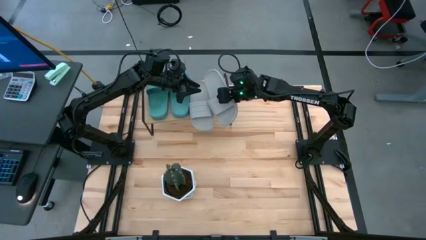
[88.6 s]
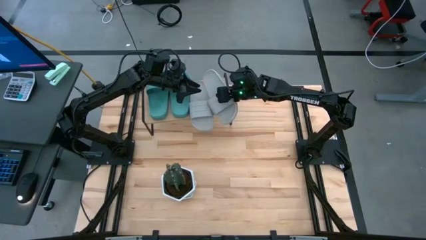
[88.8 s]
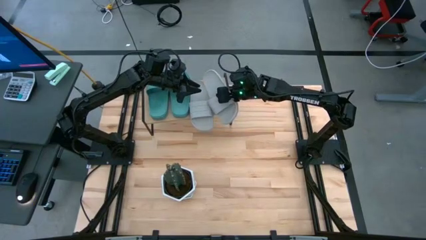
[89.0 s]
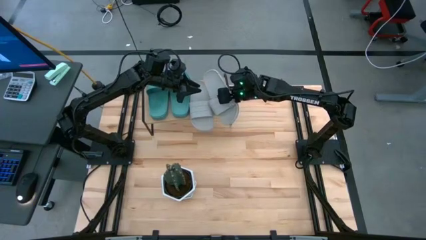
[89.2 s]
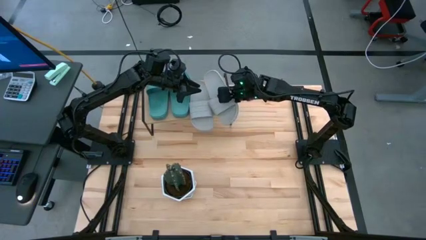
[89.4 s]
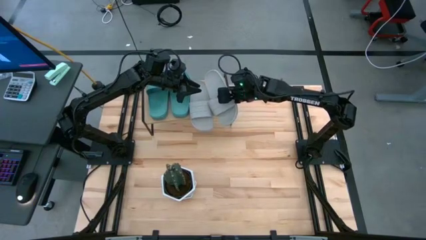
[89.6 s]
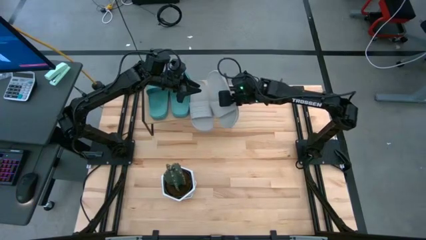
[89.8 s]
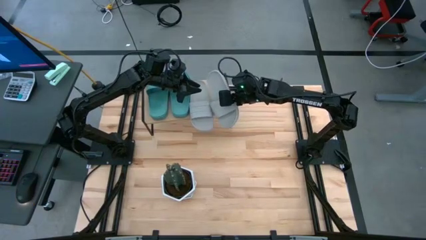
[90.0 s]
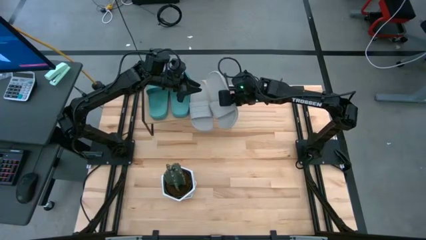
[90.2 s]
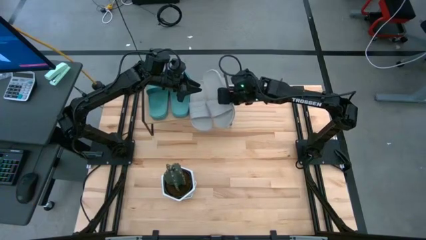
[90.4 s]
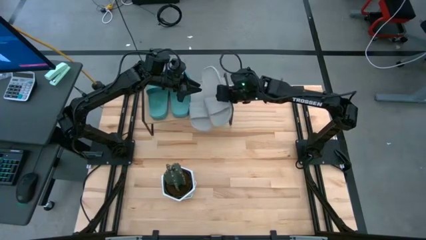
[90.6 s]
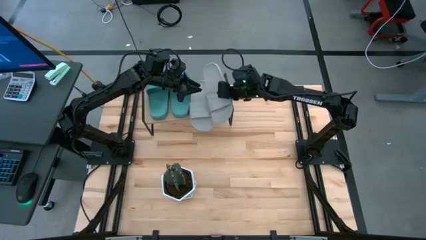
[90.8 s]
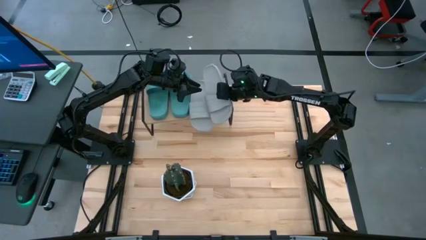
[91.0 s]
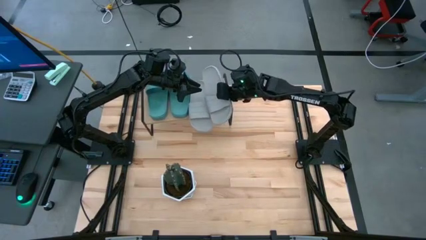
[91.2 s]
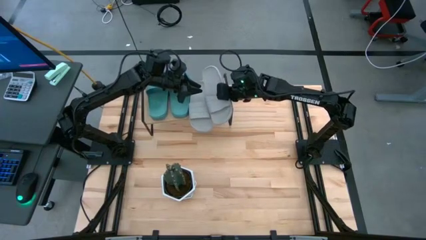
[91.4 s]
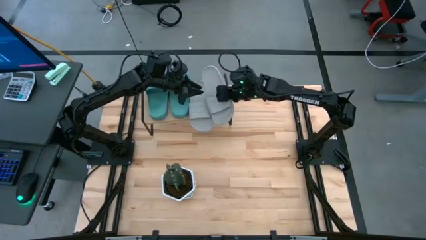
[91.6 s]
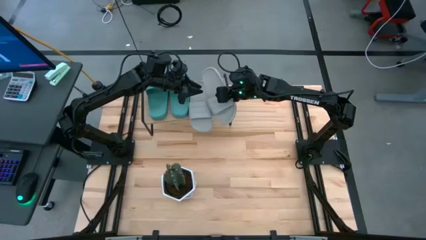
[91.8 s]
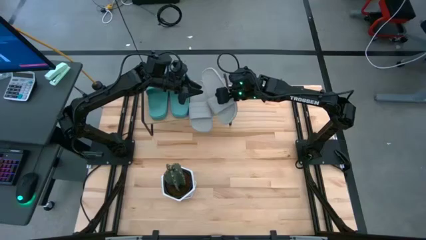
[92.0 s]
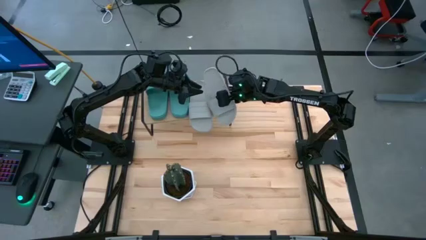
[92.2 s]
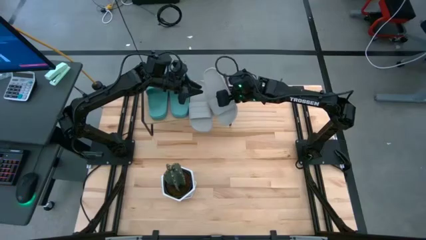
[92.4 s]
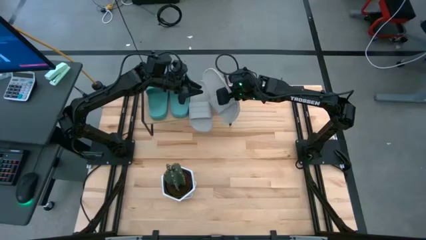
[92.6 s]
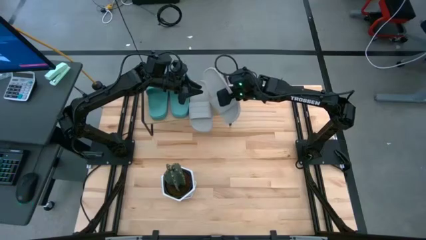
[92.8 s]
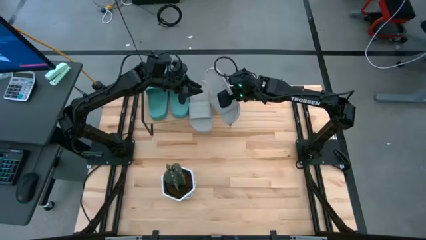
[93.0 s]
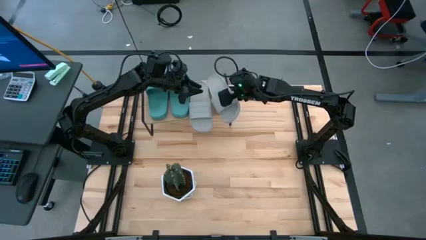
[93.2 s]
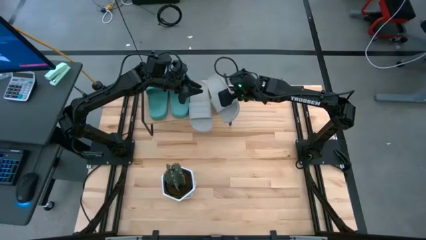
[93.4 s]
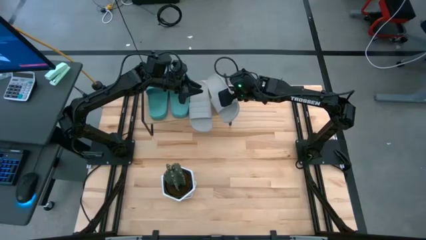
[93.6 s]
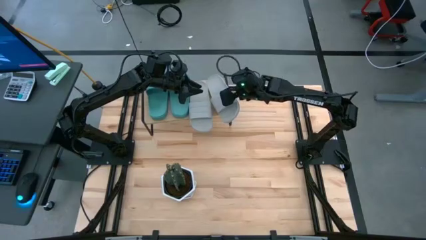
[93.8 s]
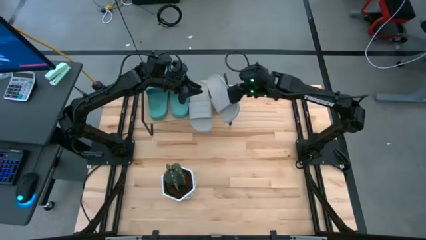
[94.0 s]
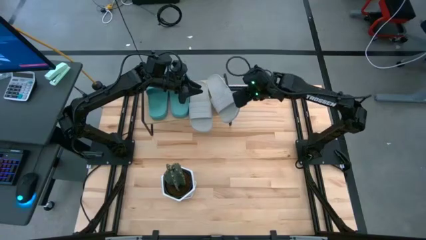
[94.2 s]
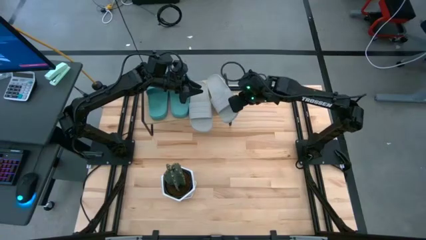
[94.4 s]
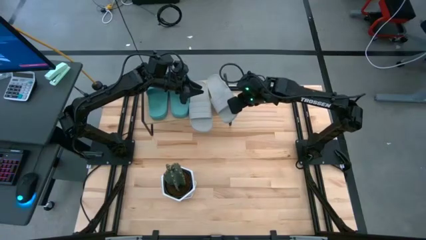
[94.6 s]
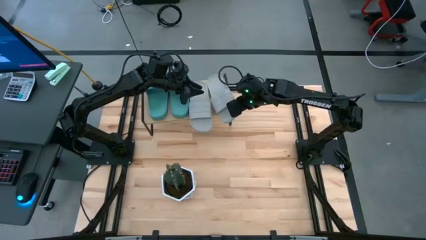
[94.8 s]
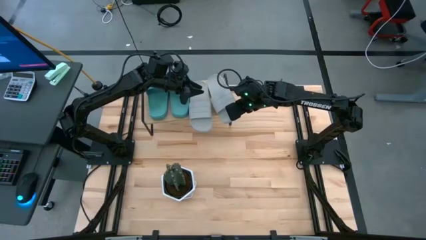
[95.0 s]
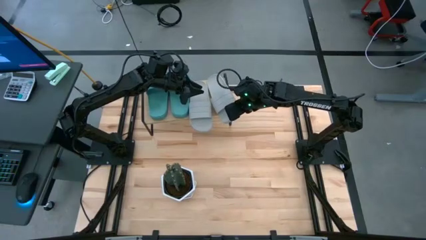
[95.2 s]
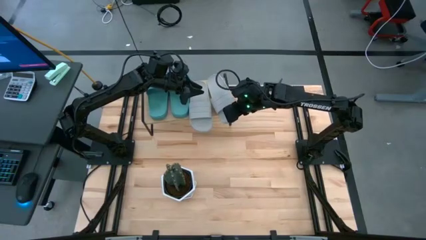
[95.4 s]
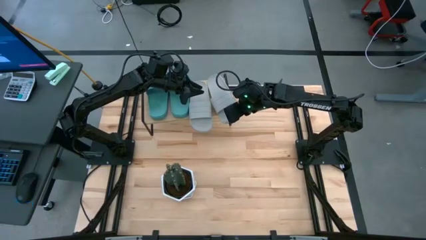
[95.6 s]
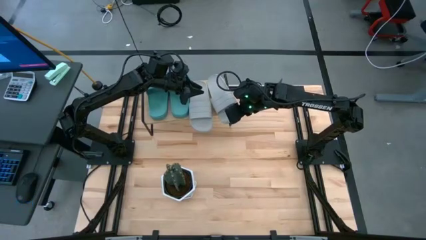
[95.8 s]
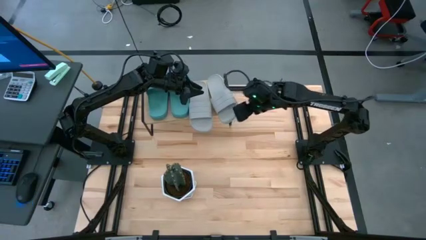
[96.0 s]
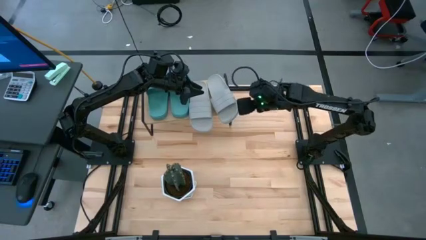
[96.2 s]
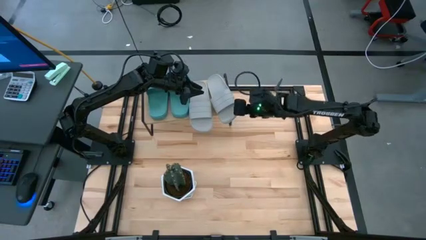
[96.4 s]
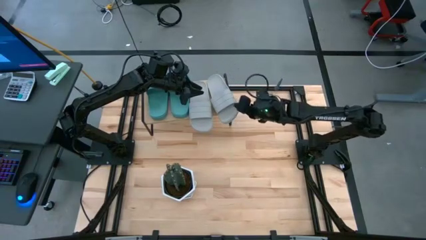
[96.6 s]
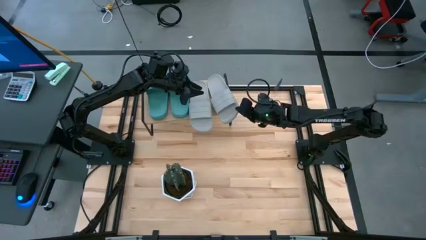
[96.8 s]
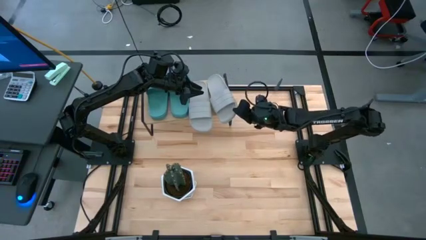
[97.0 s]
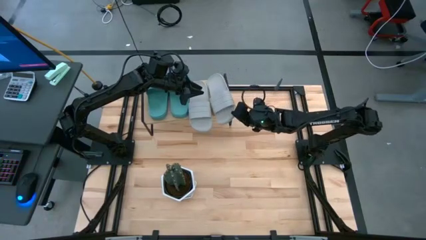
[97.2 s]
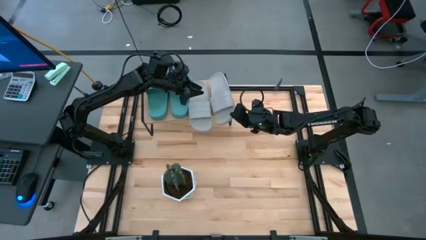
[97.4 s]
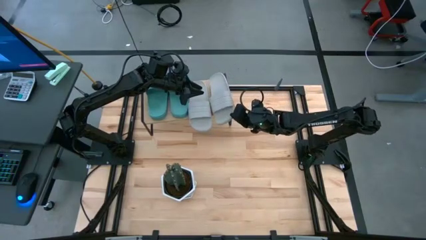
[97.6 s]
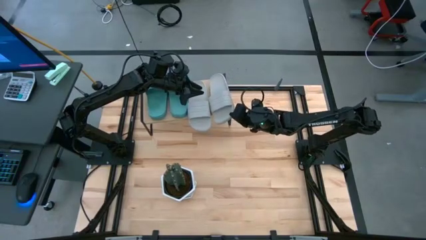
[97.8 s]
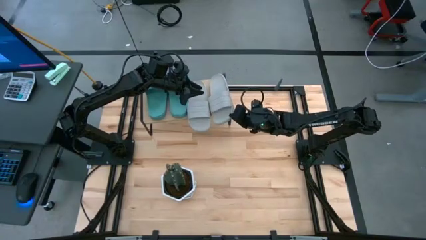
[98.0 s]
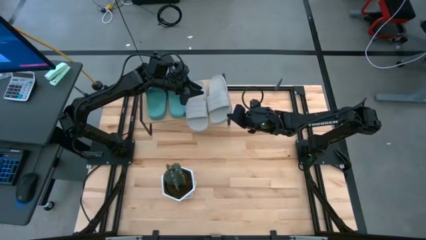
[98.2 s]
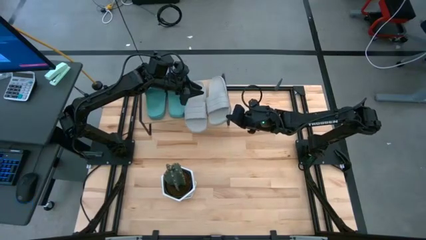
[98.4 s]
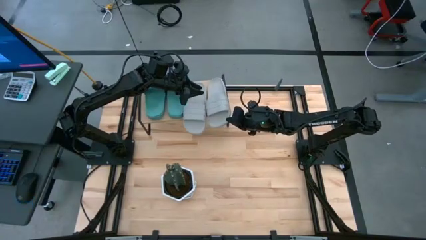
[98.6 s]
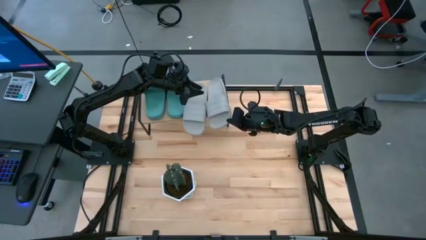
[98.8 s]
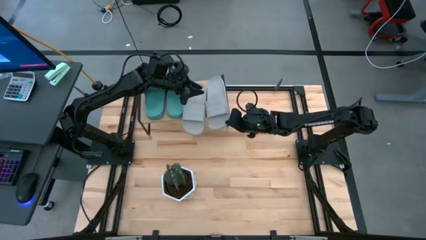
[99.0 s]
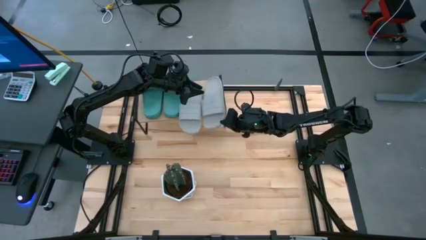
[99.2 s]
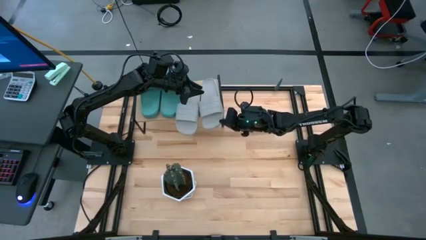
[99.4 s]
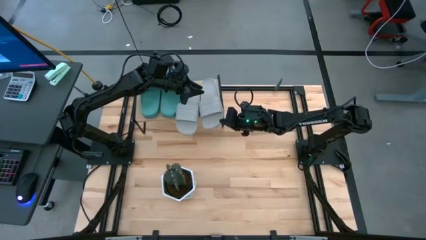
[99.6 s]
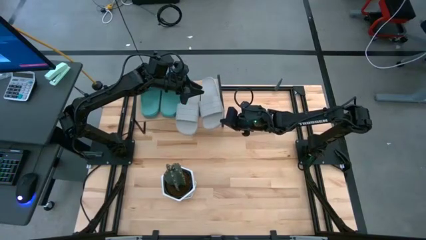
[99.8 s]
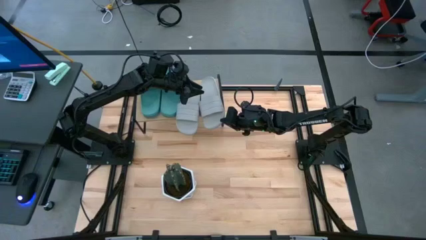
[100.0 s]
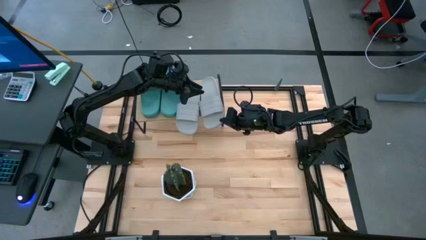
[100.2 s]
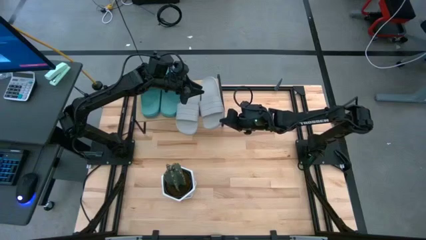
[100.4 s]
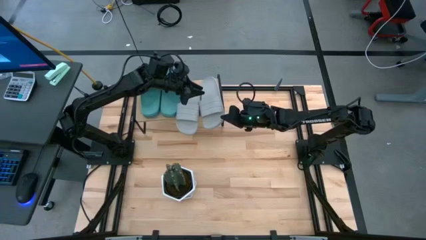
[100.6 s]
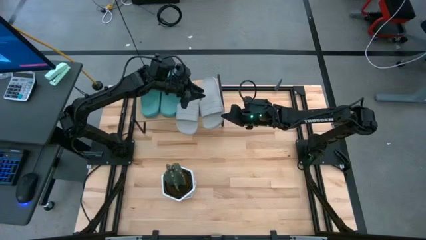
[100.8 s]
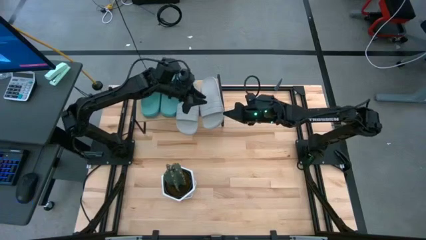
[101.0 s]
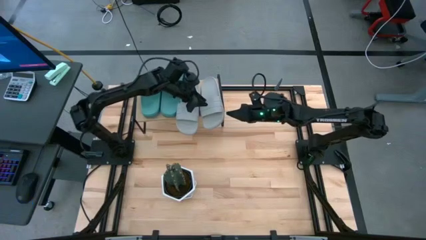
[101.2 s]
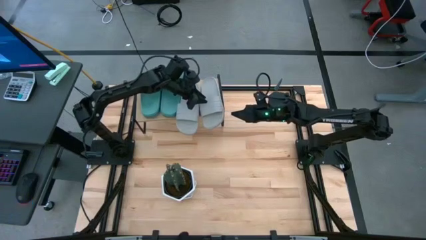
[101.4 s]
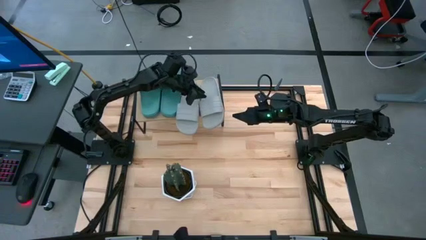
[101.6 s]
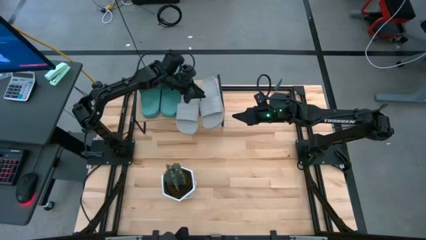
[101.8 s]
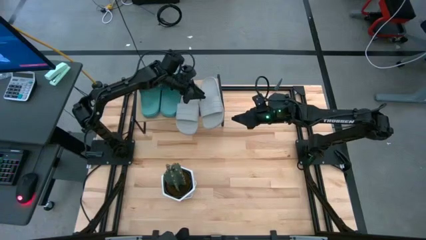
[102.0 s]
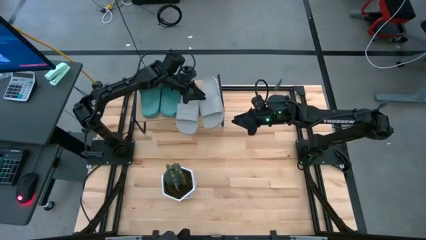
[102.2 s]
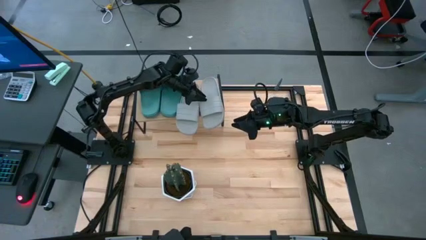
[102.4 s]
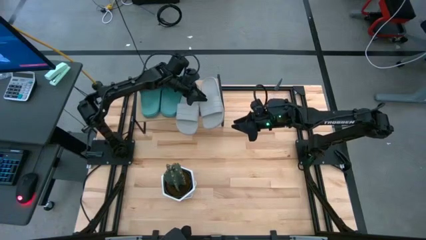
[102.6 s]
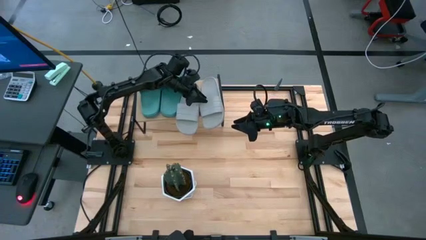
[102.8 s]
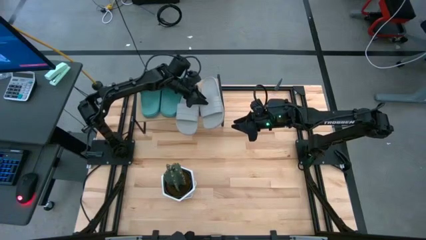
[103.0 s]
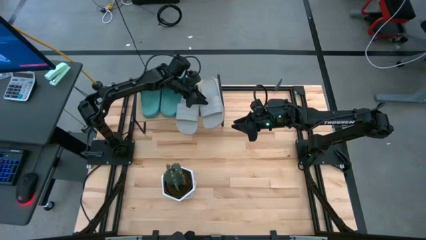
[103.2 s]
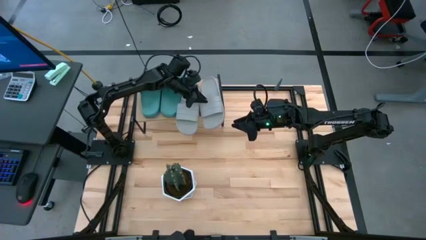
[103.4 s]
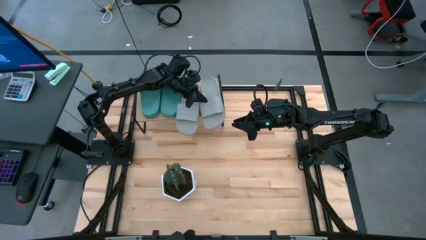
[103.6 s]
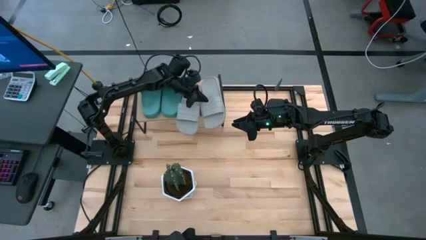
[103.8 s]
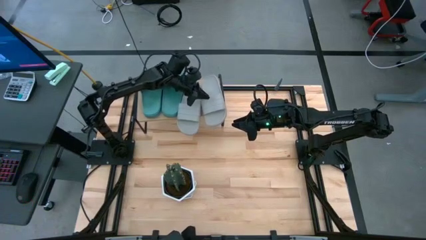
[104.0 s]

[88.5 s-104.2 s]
Task: Pick and place slides into the shelf
Put the gray slipper on the shelf
